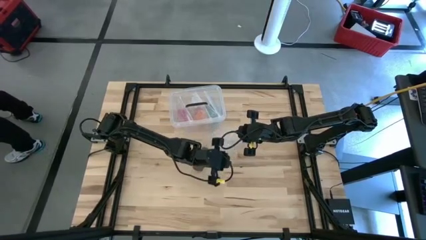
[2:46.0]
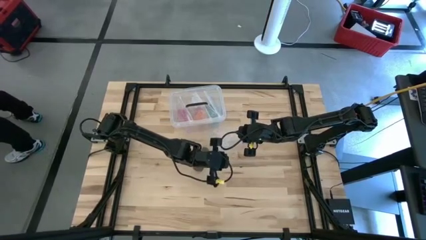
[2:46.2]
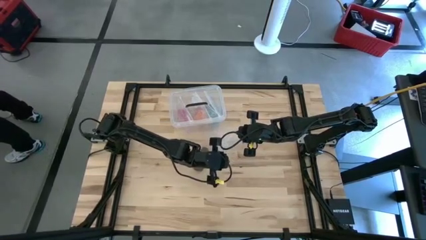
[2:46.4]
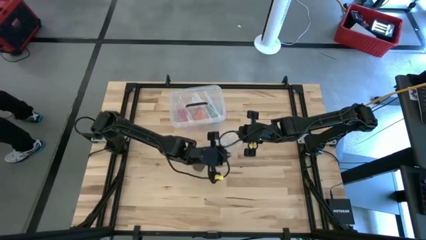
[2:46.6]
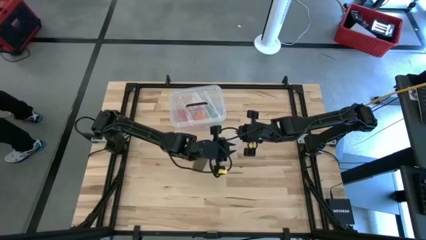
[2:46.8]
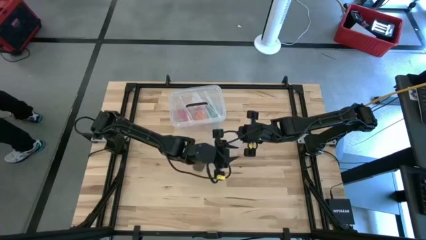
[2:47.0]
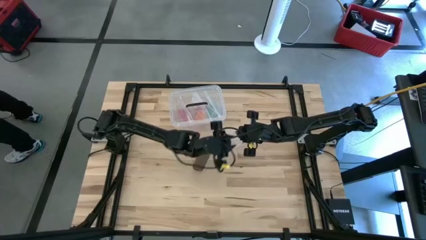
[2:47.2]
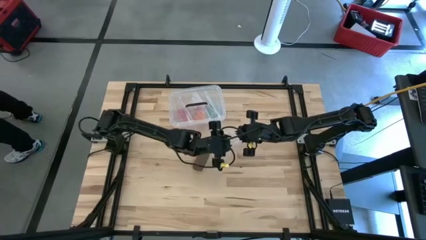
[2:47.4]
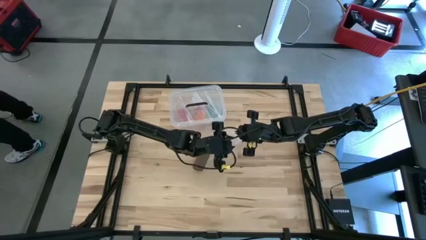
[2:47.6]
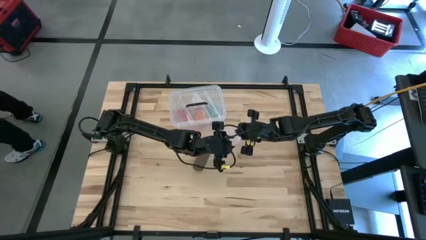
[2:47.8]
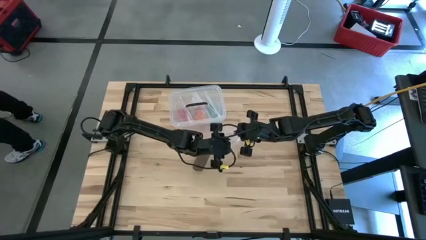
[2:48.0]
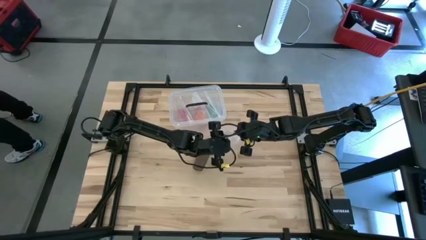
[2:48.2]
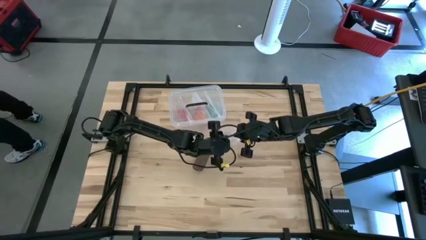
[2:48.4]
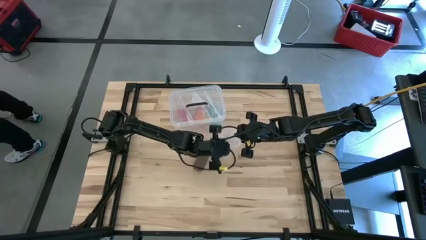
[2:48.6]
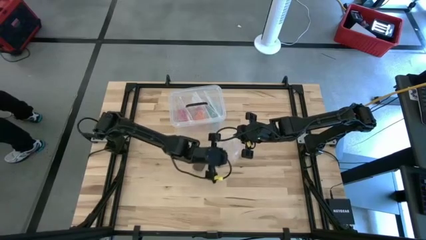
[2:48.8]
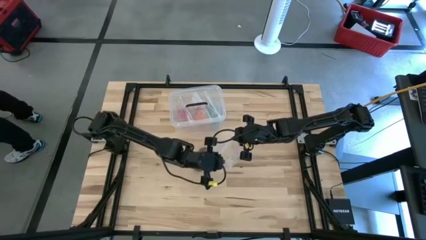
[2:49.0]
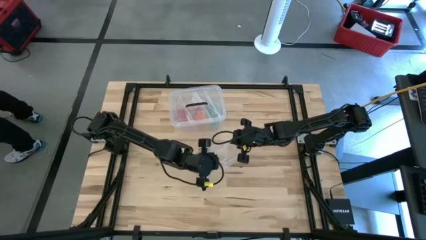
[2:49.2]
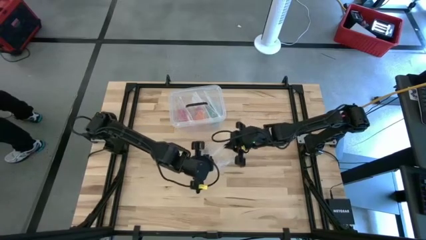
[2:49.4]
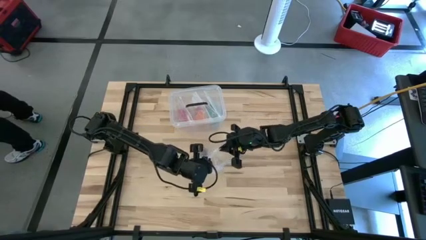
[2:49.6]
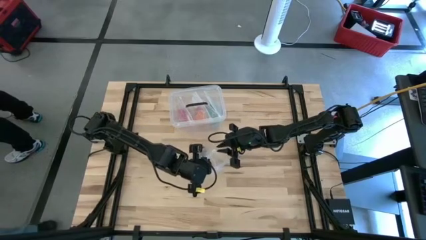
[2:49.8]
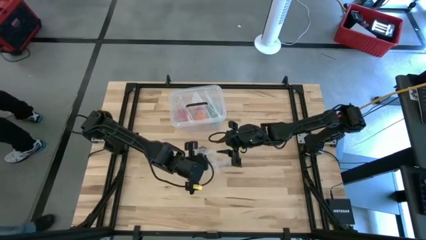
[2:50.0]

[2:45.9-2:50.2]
Task: Roll bandage
Open the transparent zip bag

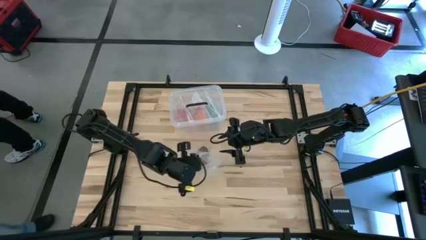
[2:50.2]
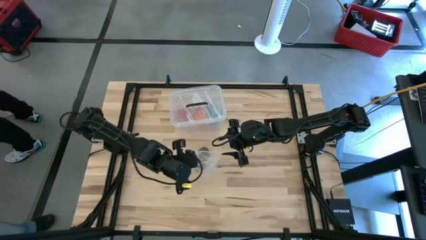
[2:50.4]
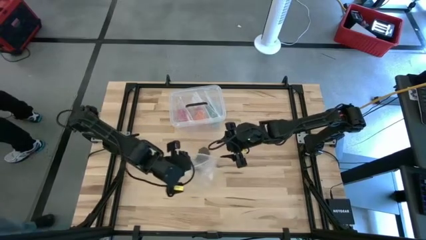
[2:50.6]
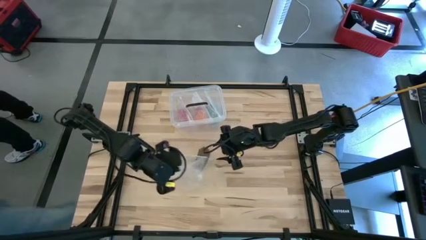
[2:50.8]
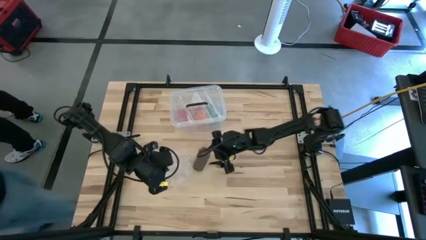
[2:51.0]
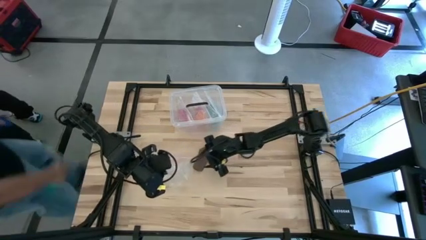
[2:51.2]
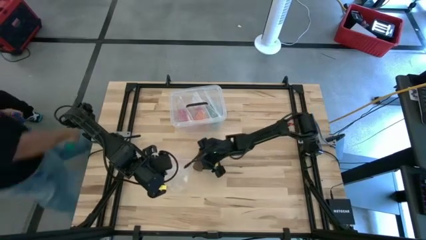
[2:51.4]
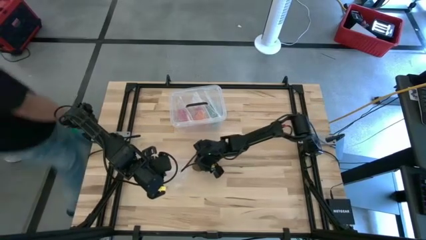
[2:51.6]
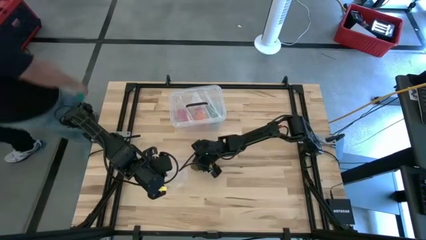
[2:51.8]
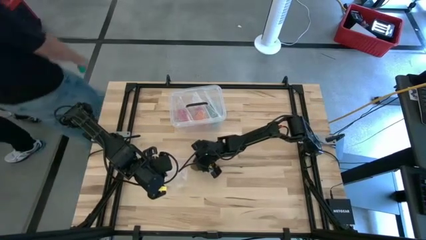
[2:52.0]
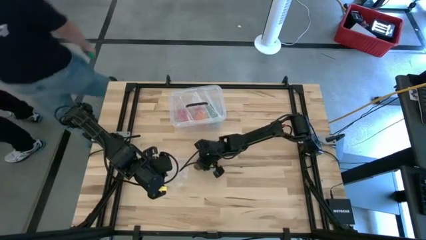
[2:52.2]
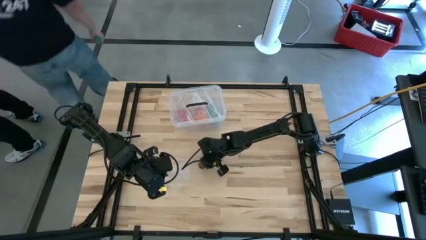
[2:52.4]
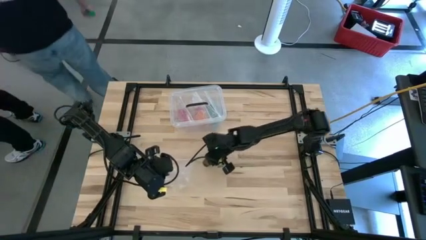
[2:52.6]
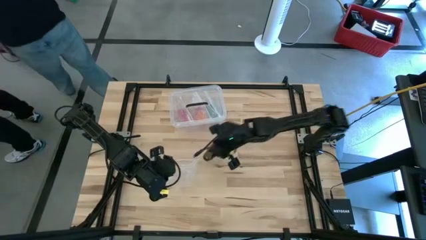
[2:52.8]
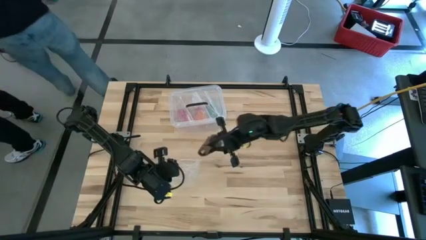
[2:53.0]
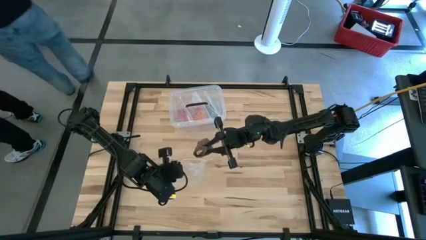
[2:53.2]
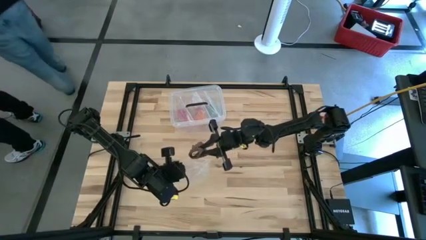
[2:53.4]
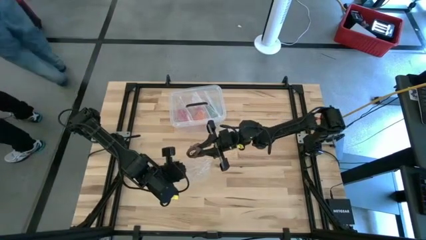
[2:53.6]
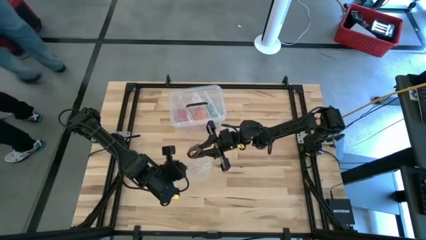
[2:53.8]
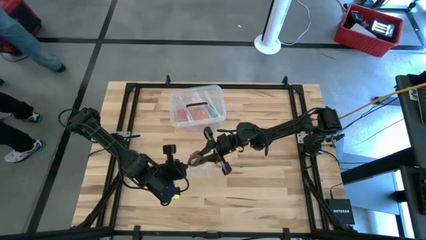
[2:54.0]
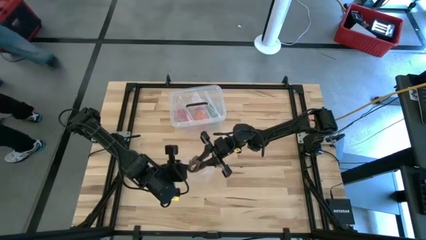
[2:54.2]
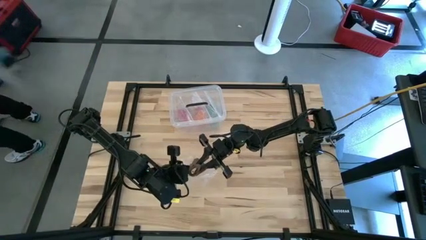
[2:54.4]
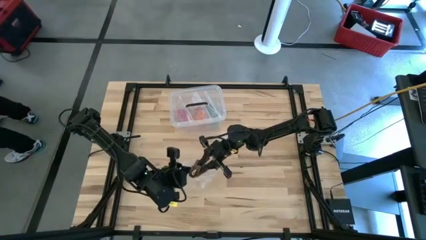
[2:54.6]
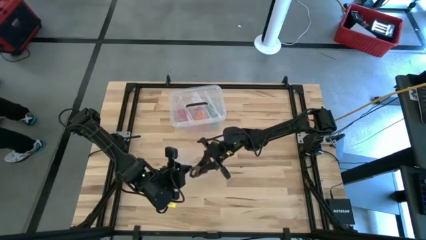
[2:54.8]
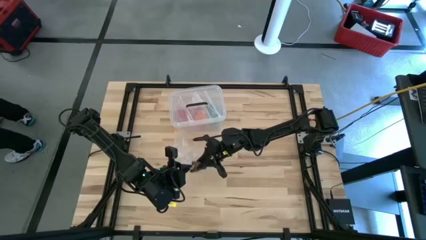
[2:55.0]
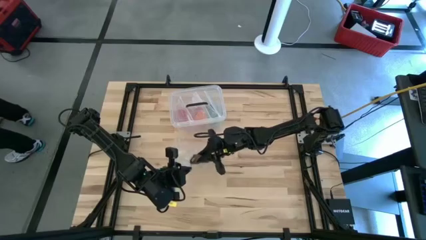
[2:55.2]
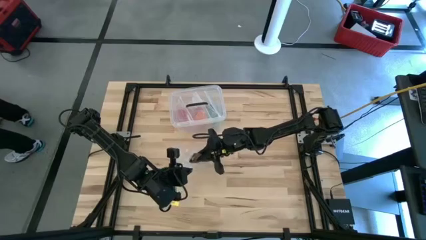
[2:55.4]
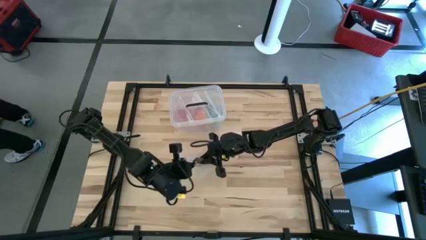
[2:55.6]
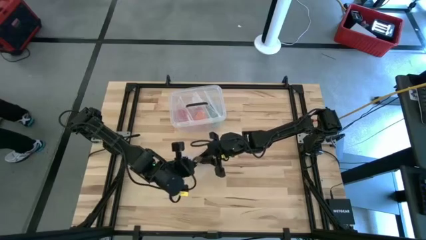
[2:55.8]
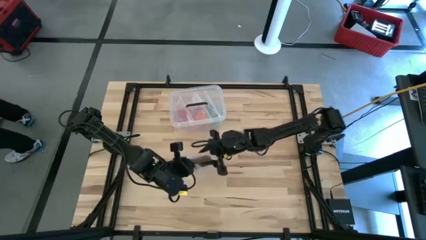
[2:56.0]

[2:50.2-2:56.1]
Put the rolled brown bandage into the transparent zip bag

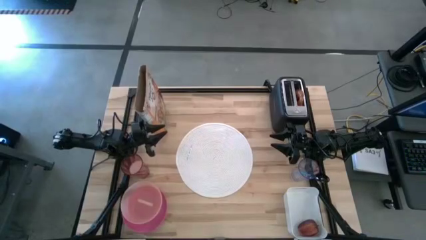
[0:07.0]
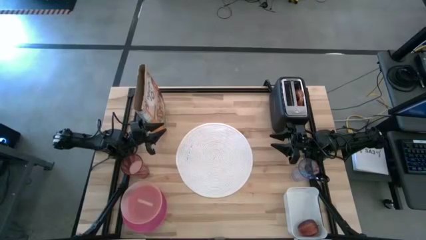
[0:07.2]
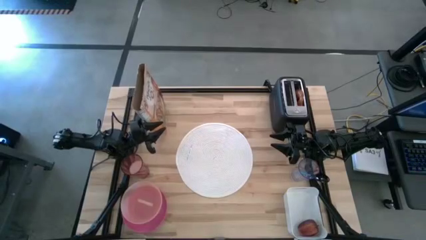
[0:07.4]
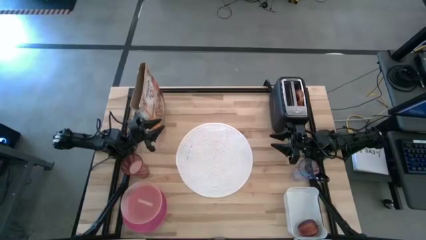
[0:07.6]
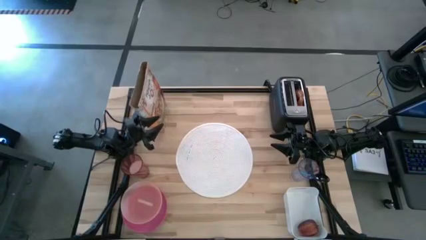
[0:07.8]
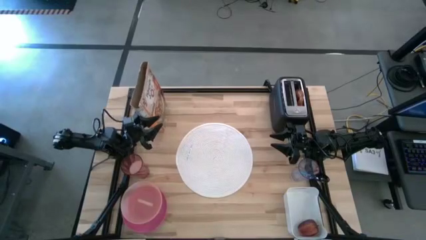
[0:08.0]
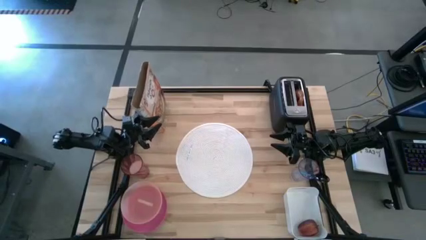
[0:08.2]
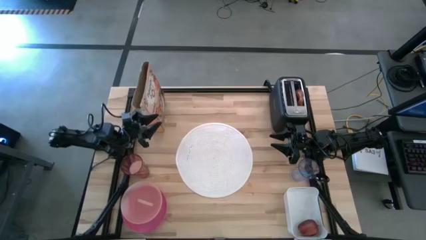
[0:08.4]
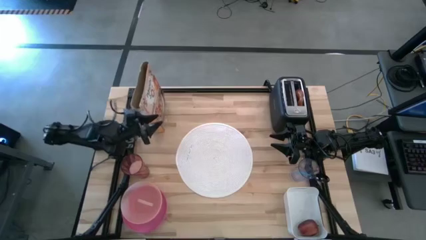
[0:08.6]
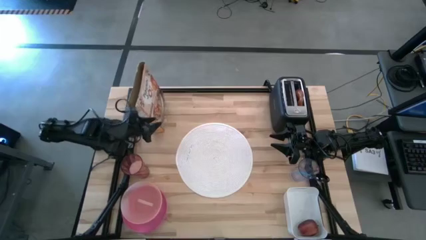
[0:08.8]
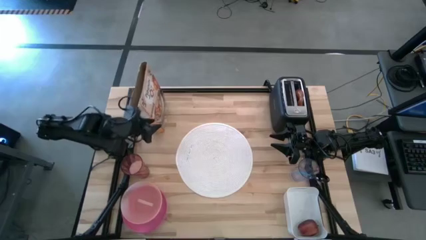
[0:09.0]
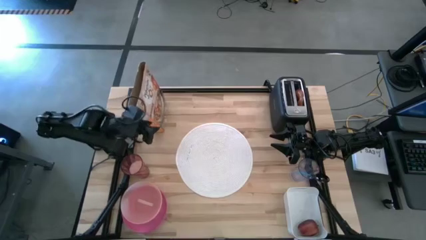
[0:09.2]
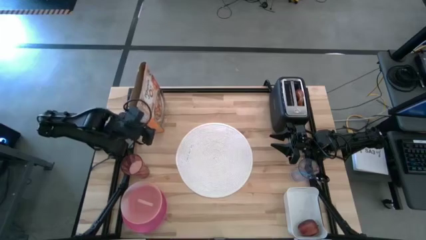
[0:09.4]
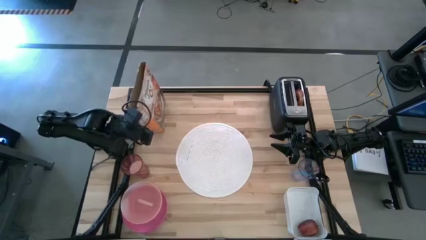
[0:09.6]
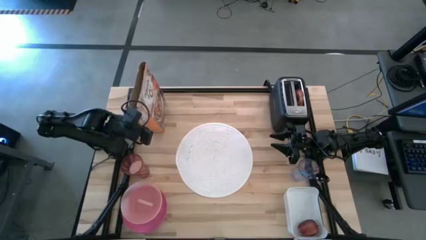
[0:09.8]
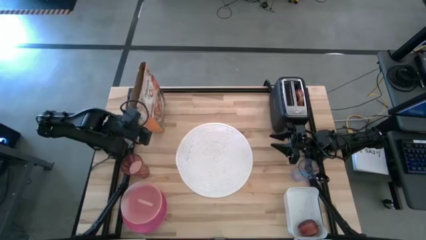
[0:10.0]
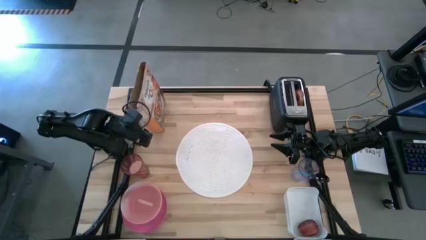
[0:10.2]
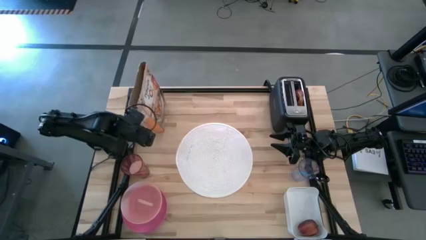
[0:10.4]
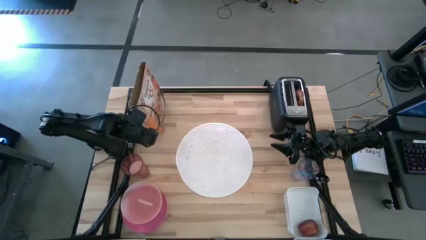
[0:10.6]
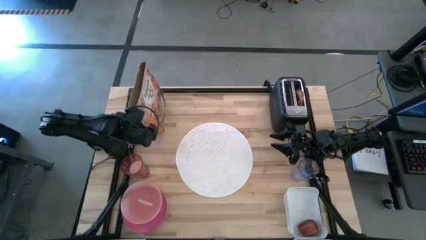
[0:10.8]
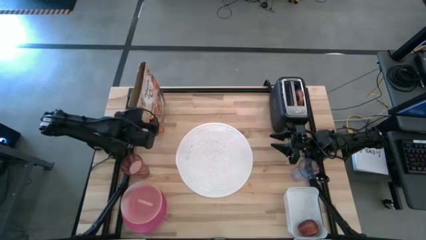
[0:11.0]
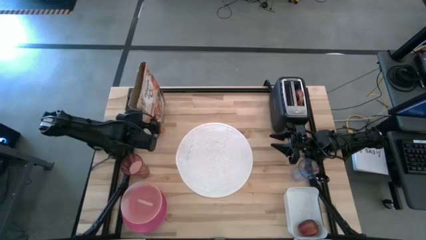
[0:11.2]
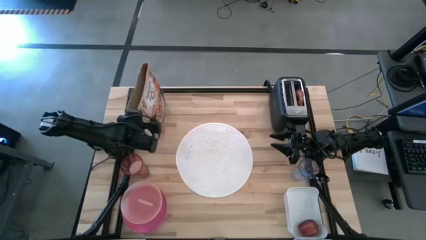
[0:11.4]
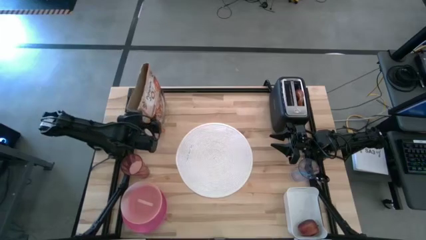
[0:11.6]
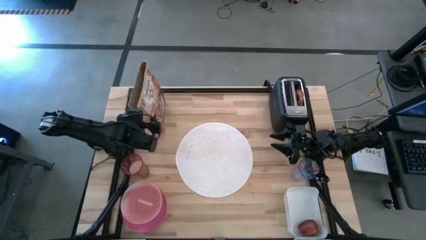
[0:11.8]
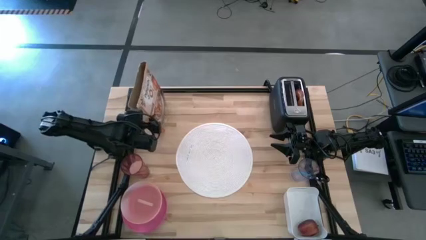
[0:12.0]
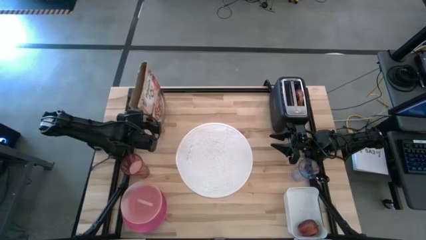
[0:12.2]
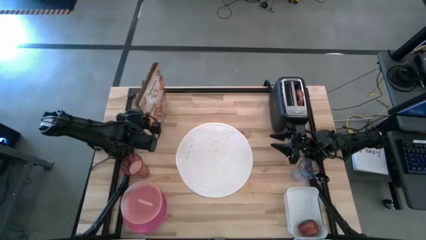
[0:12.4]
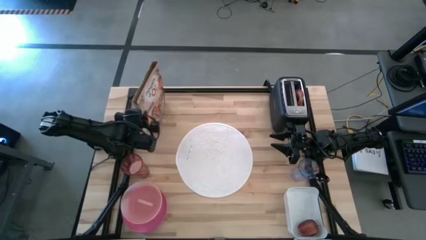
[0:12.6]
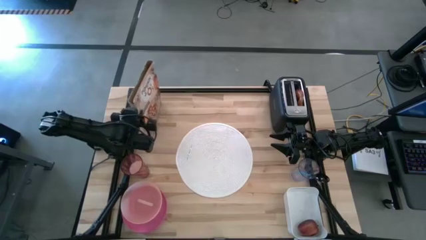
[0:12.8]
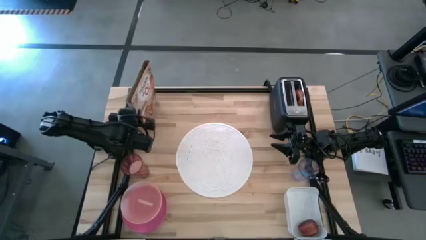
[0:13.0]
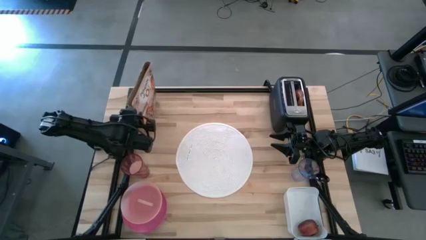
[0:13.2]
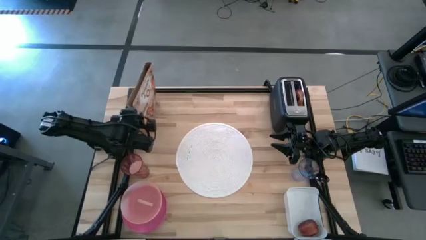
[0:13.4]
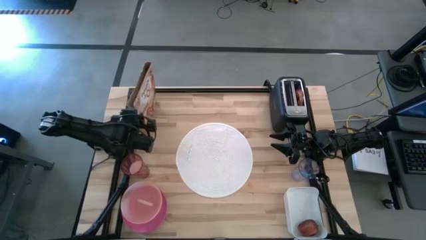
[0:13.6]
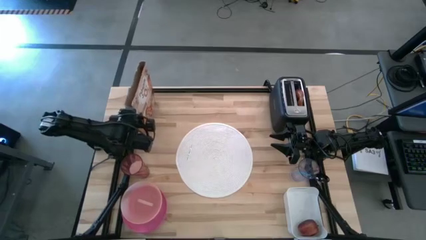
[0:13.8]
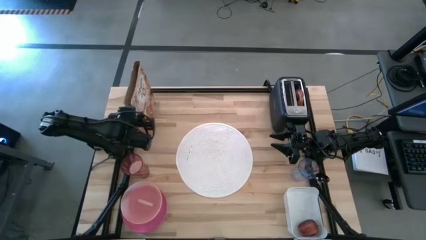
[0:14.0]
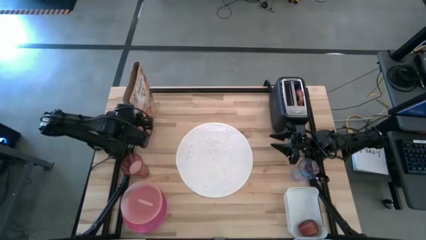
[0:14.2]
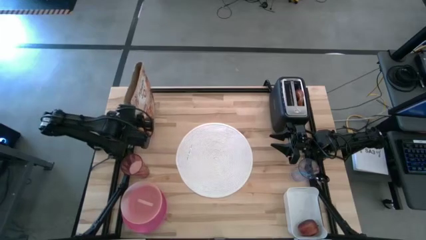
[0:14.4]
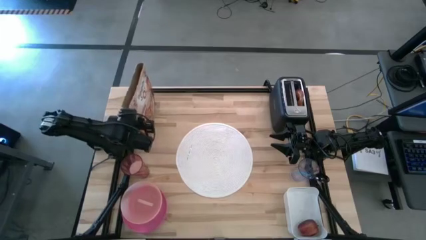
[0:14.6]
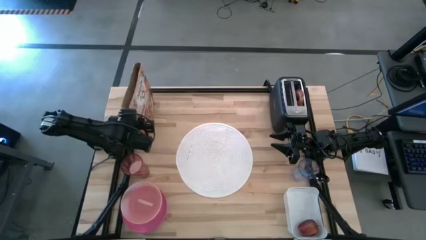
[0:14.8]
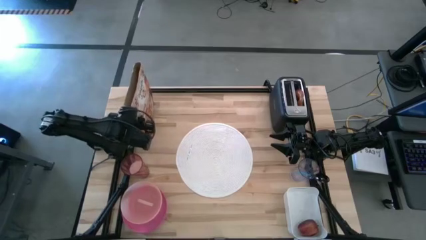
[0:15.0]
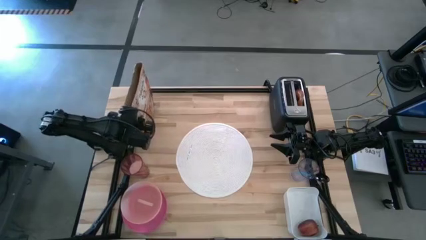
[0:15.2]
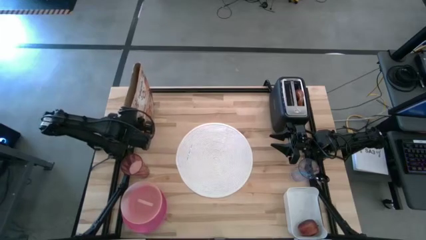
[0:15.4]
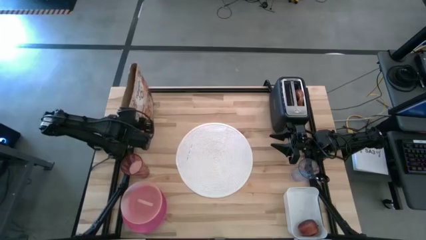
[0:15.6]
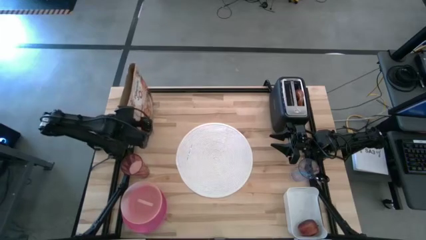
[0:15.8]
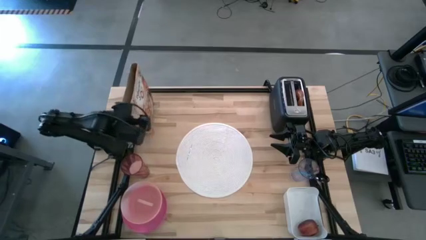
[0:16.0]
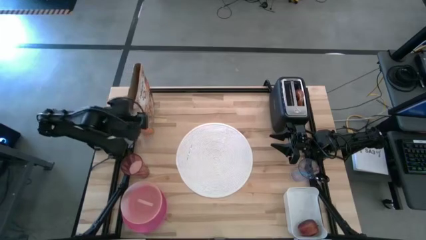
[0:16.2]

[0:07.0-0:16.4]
Task: Arrange a breakfast setting
Adjust the cereal box on the table
